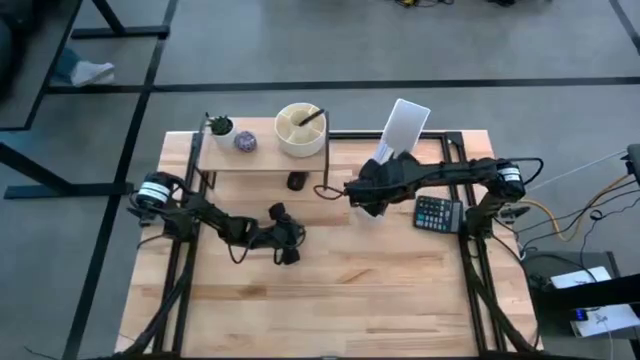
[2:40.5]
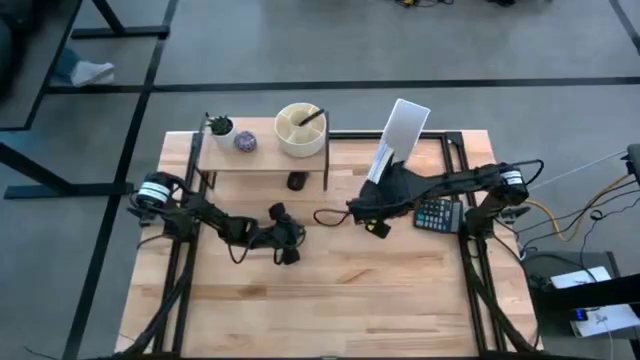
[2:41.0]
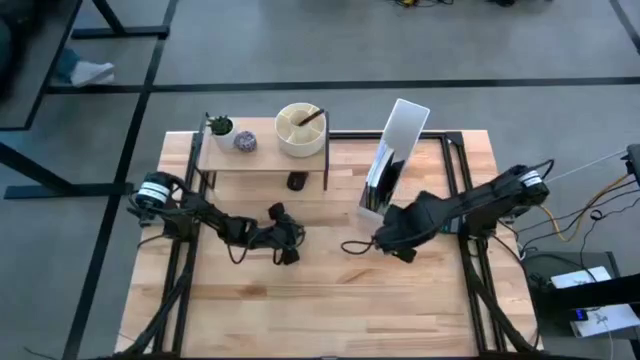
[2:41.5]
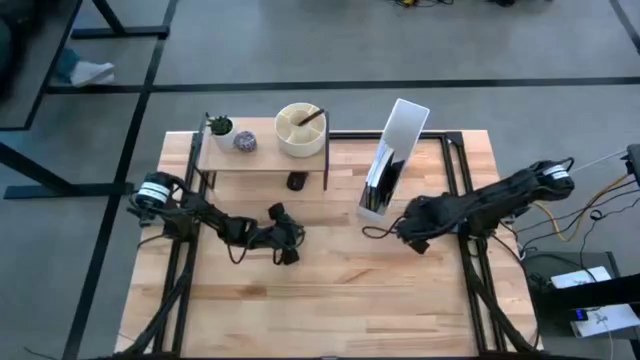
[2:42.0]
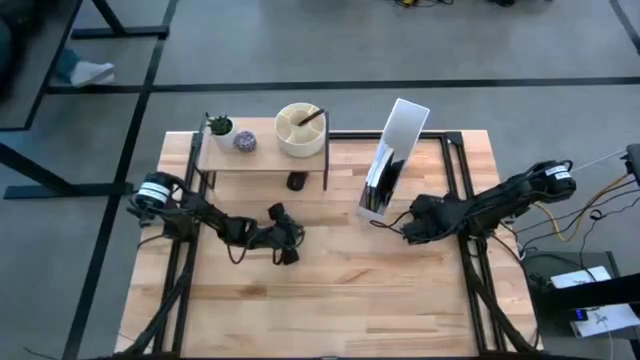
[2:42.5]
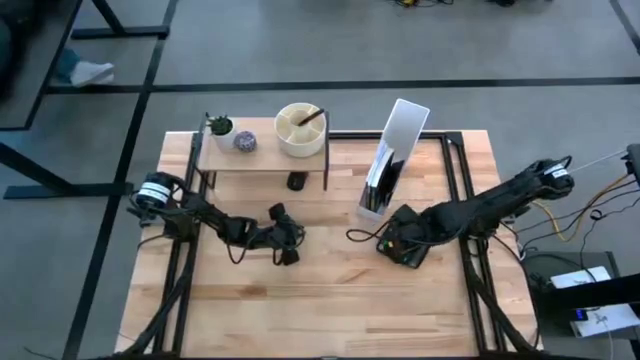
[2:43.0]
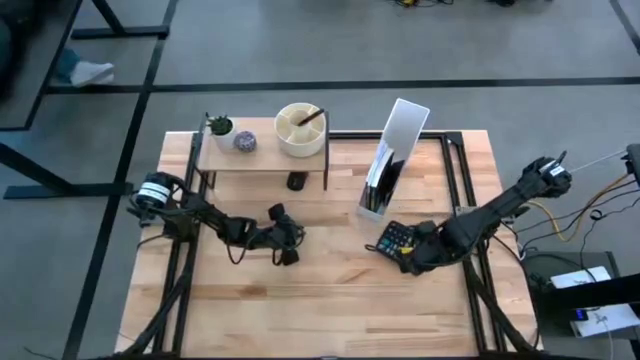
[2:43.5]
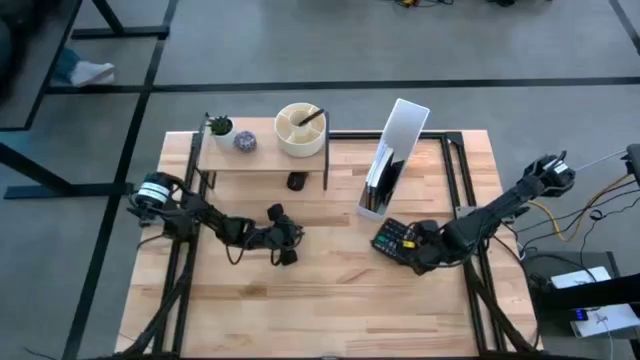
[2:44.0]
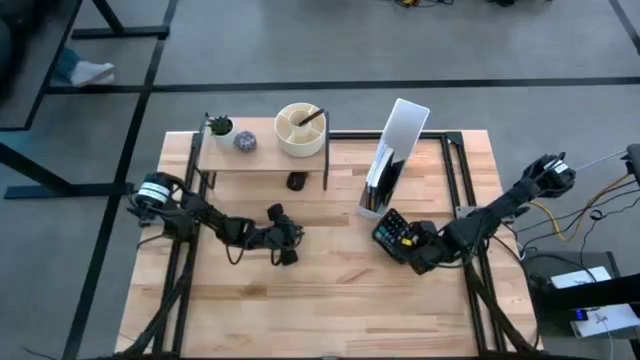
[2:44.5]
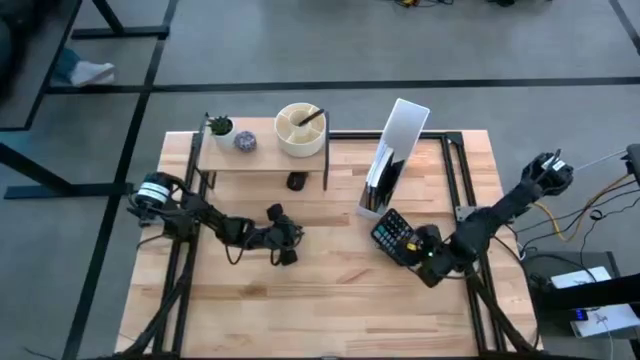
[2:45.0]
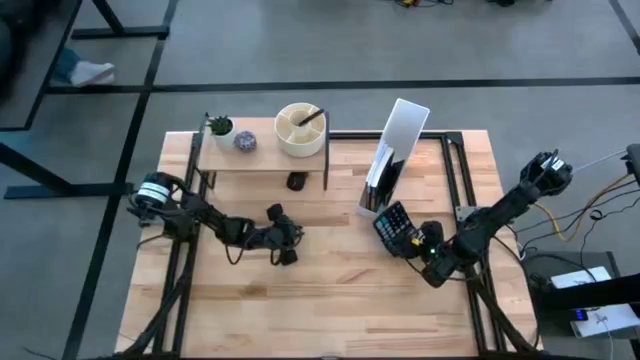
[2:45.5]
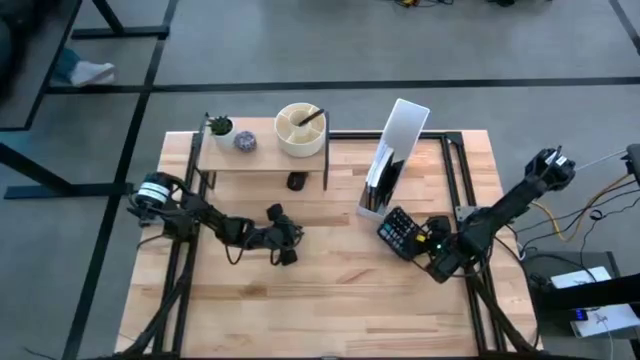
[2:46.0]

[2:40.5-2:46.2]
Task: Stock shelves
Put the black calculator into the white file holder

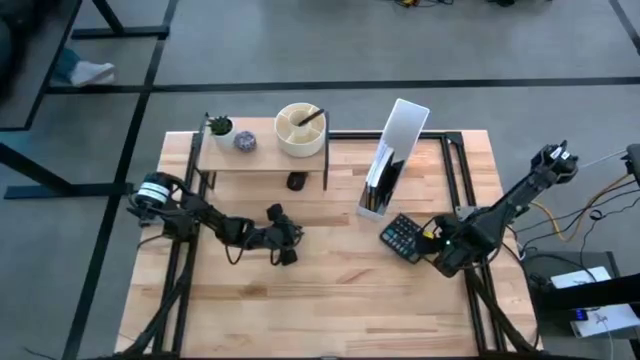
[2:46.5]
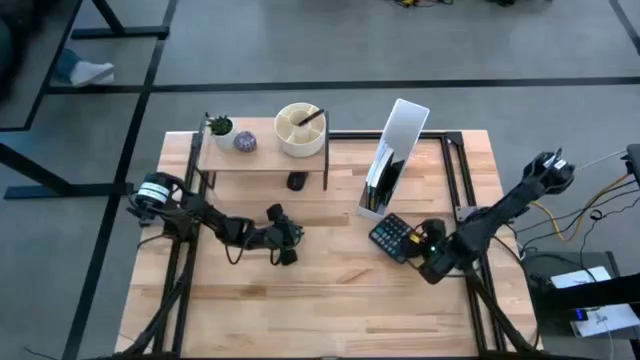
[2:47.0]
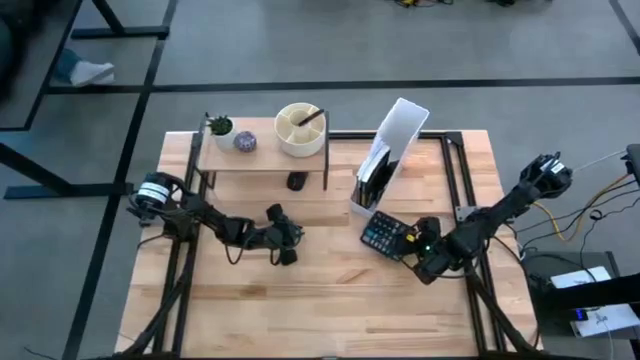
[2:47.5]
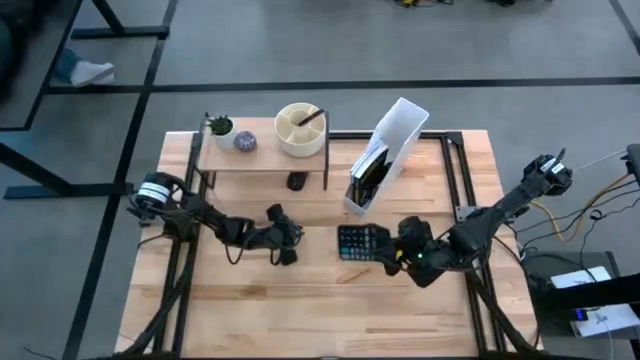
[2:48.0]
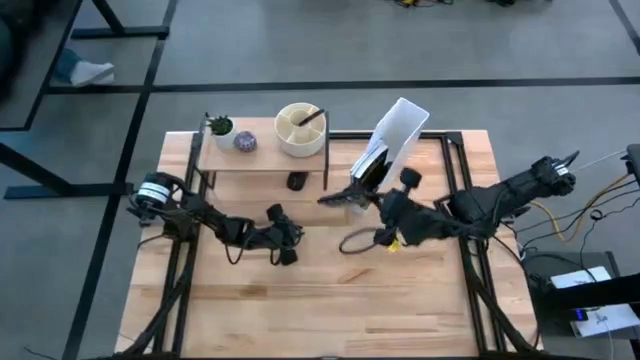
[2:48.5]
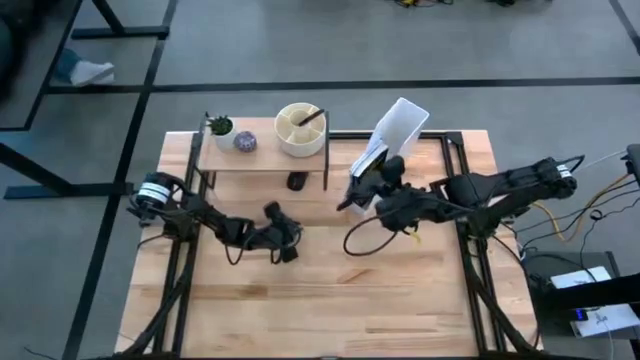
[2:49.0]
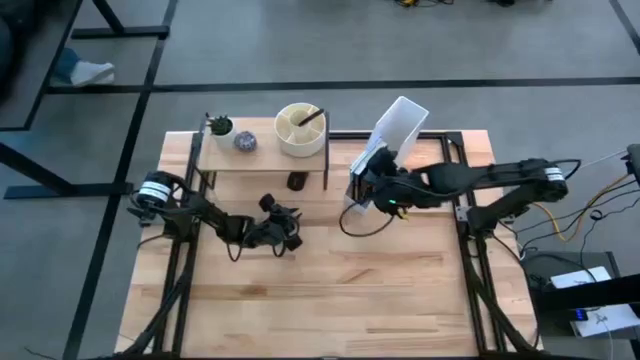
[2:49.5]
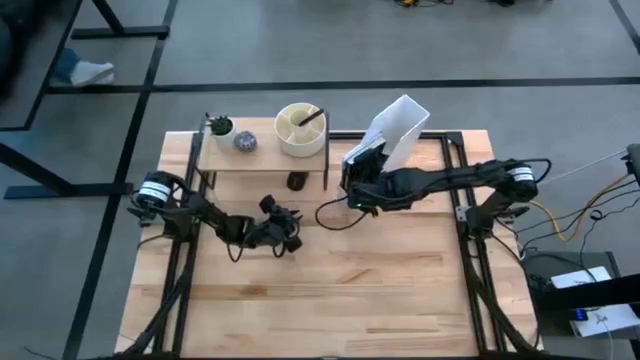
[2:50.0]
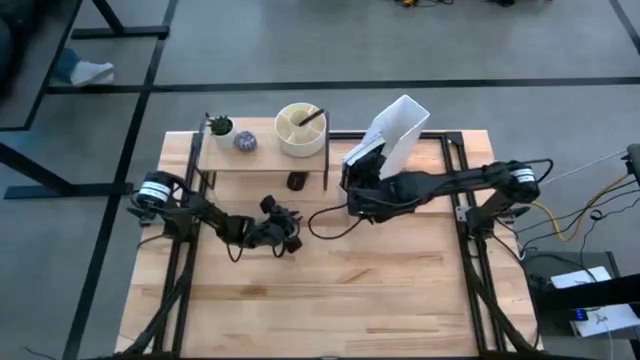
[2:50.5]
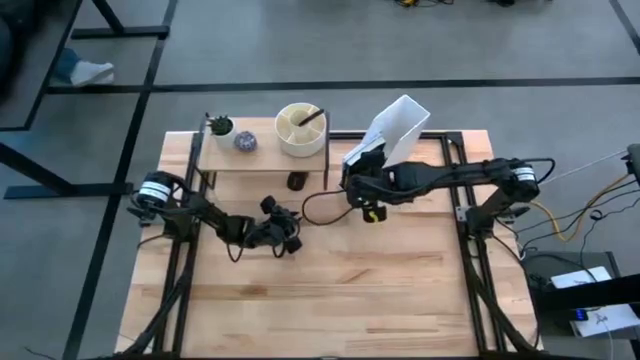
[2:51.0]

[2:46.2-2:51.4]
Put the black calculator into the white file holder

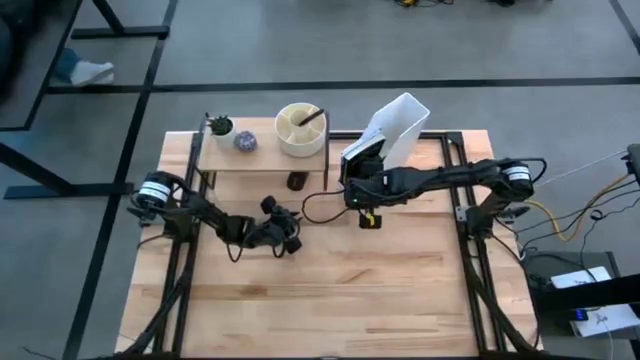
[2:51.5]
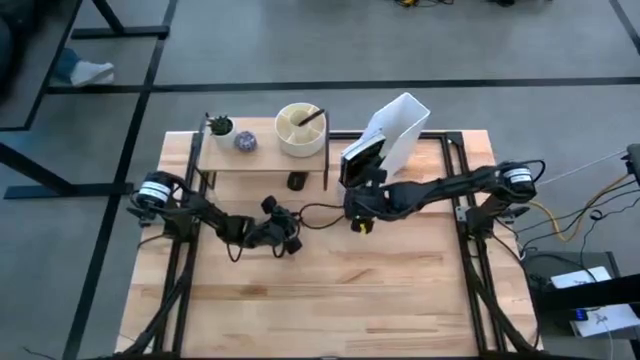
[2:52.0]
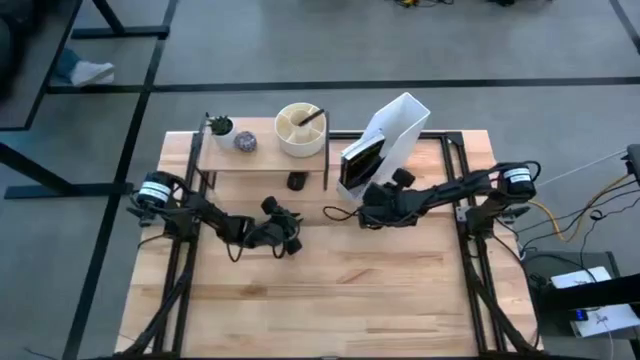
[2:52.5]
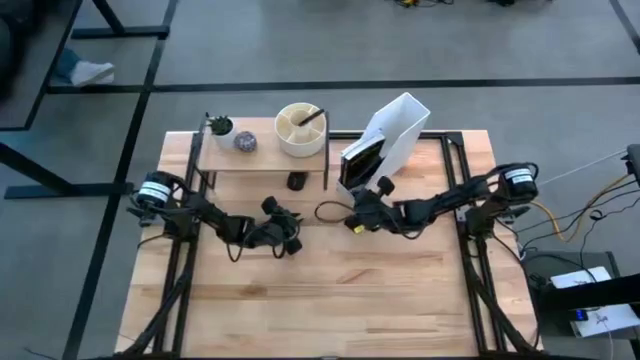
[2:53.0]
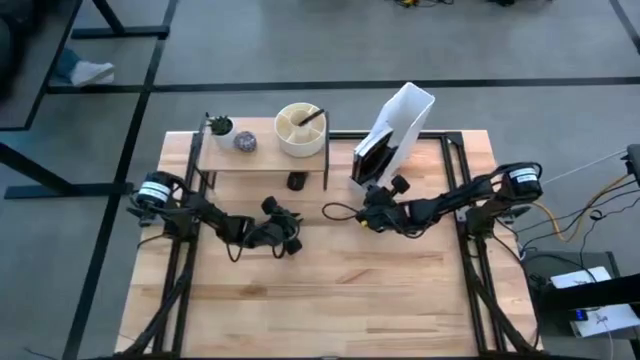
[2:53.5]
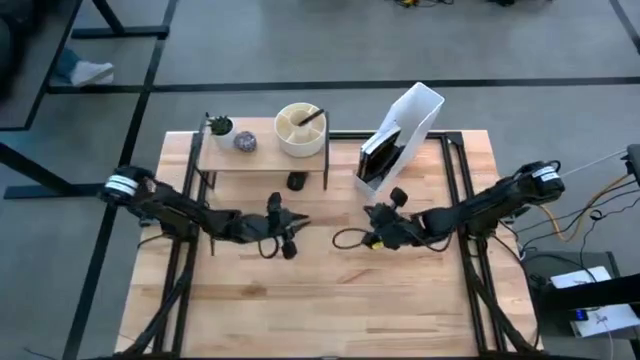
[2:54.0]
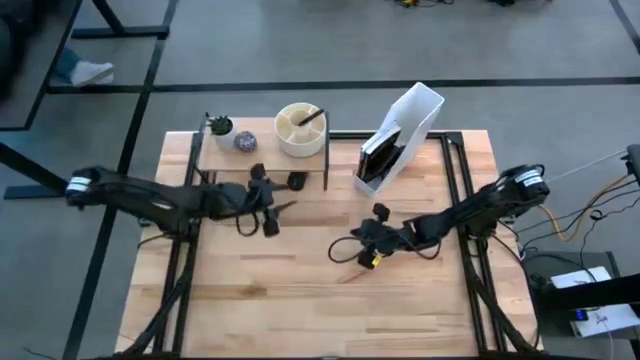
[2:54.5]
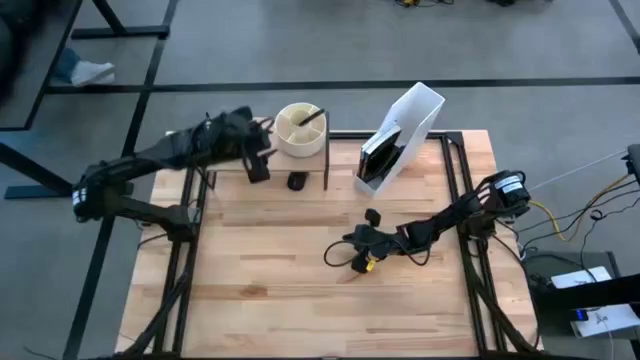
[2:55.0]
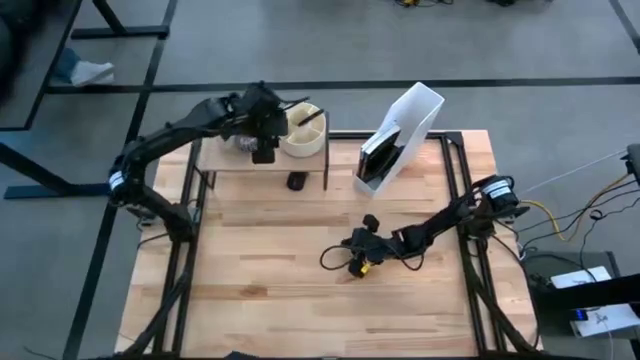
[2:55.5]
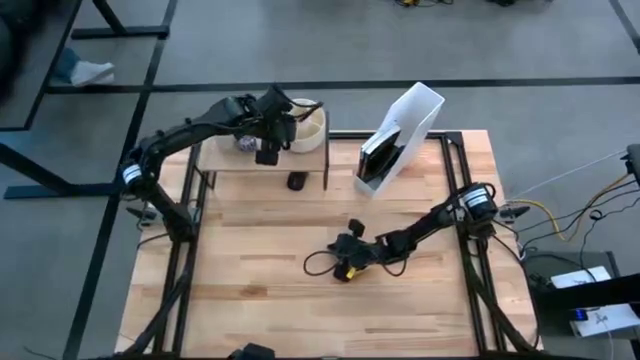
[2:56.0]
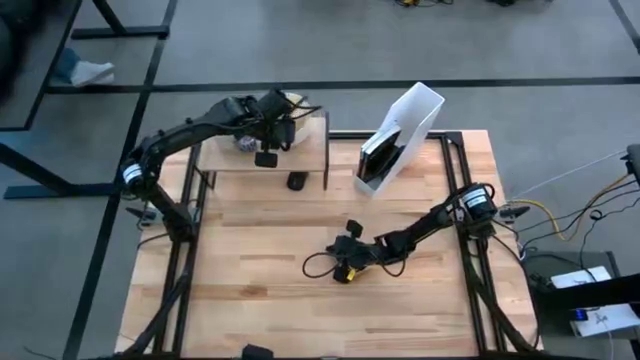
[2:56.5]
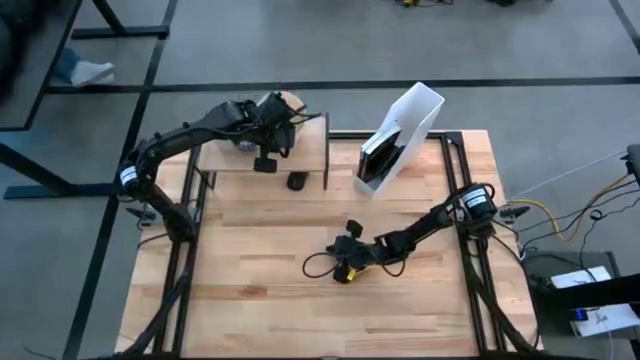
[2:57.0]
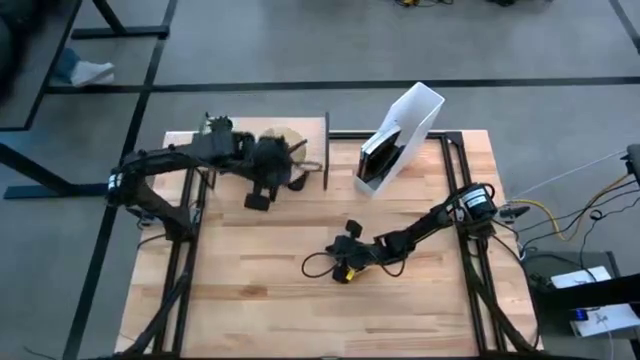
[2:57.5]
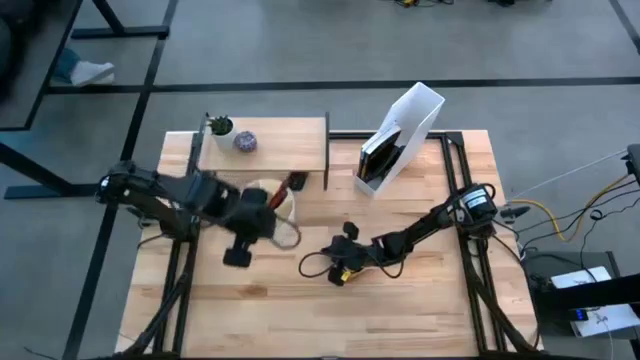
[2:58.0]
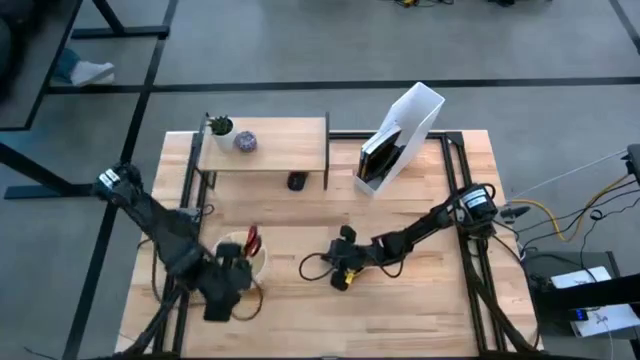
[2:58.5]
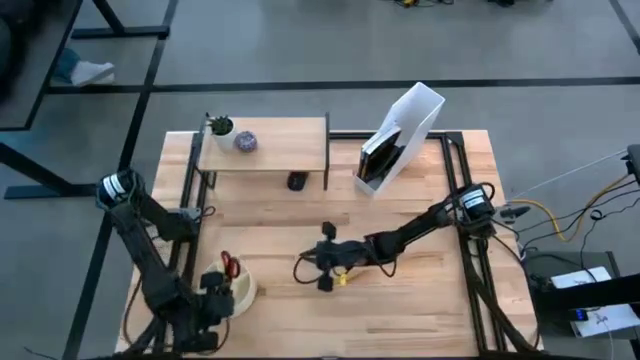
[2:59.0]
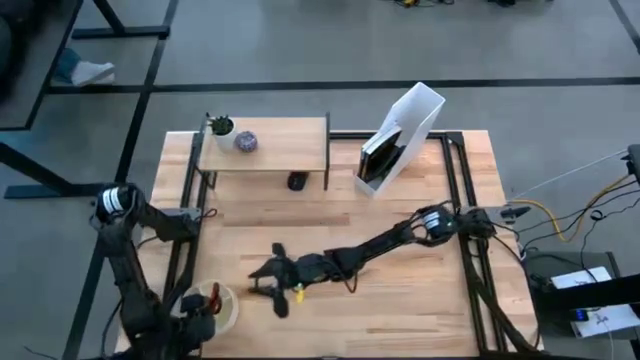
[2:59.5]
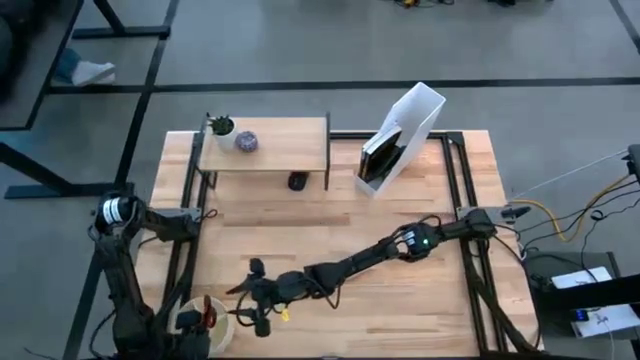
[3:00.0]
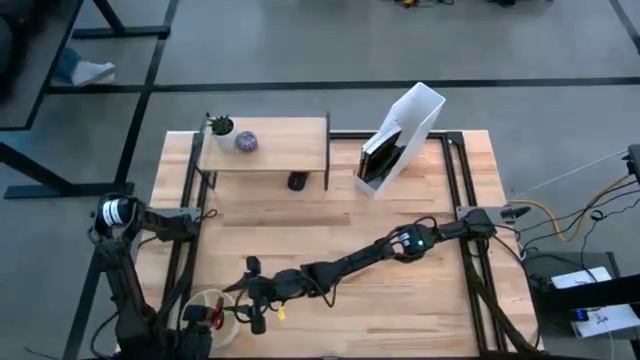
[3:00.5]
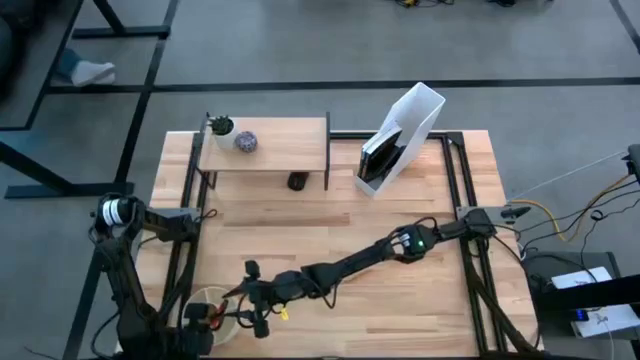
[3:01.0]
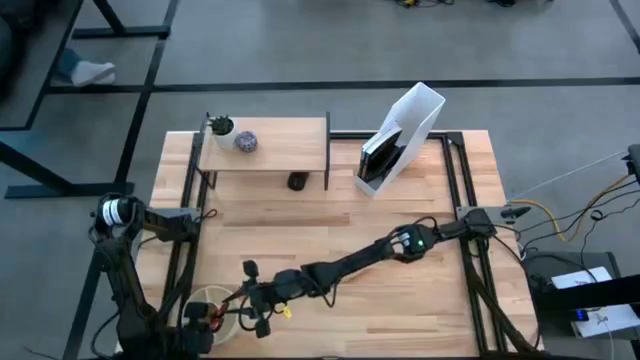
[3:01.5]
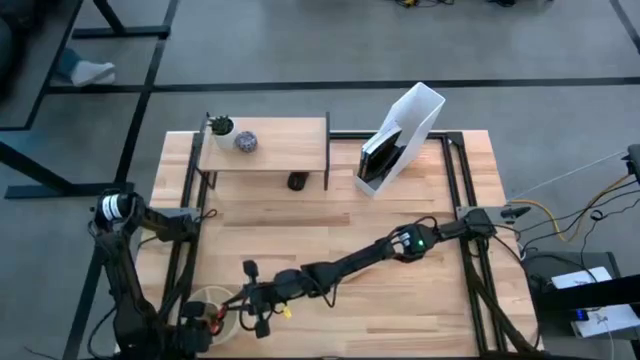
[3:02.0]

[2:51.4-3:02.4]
Remove the white pen organizer from the shelf
